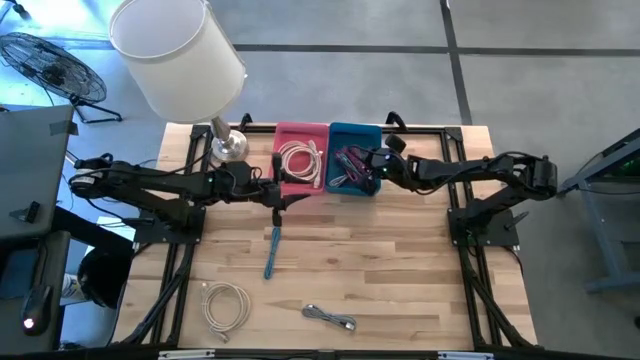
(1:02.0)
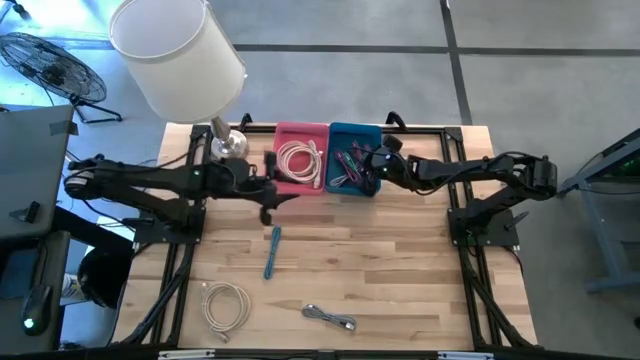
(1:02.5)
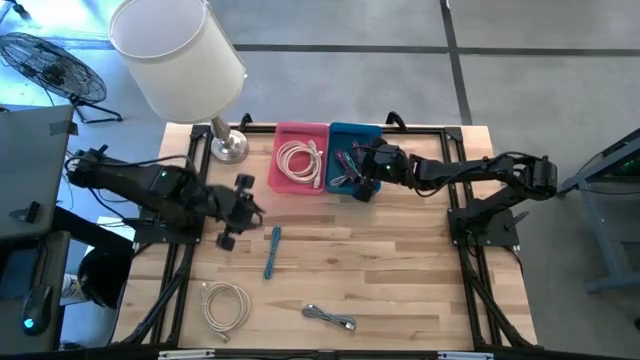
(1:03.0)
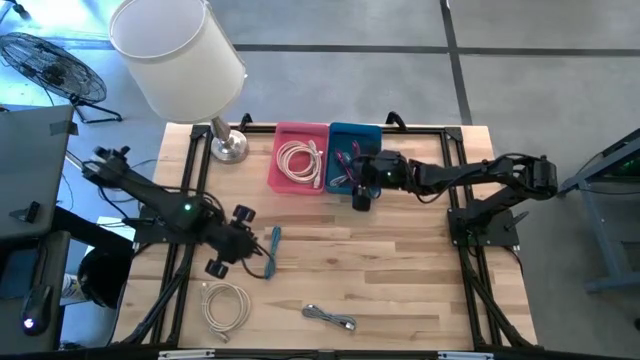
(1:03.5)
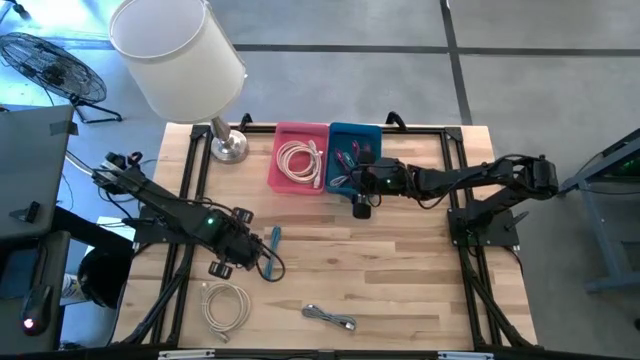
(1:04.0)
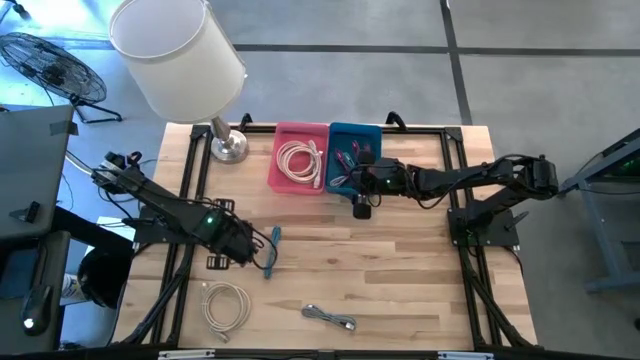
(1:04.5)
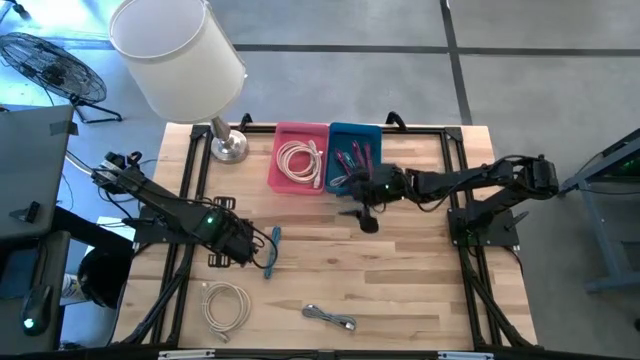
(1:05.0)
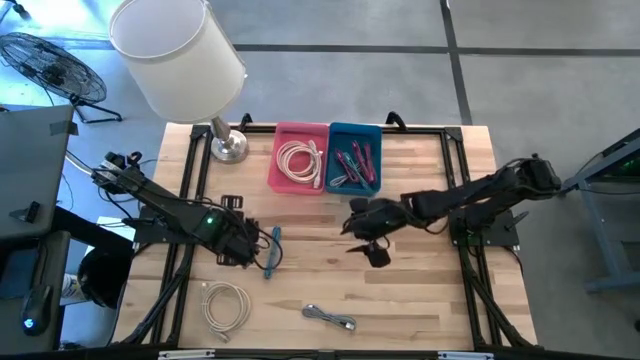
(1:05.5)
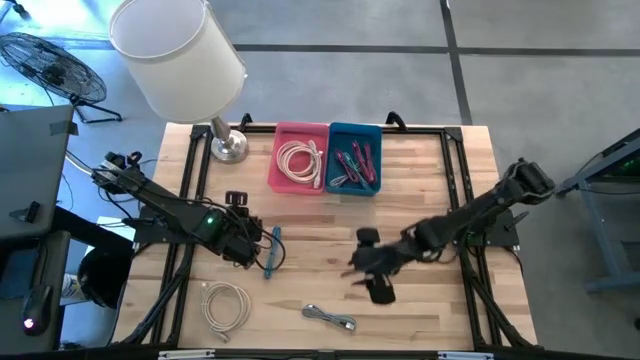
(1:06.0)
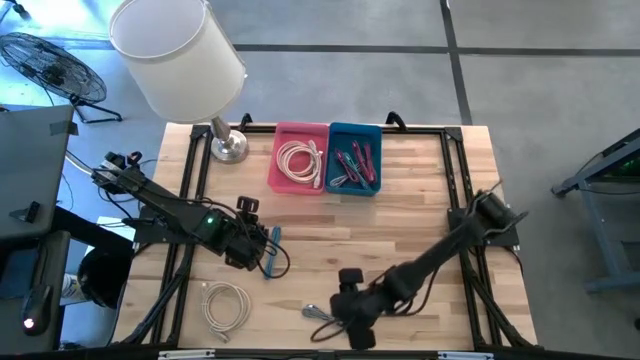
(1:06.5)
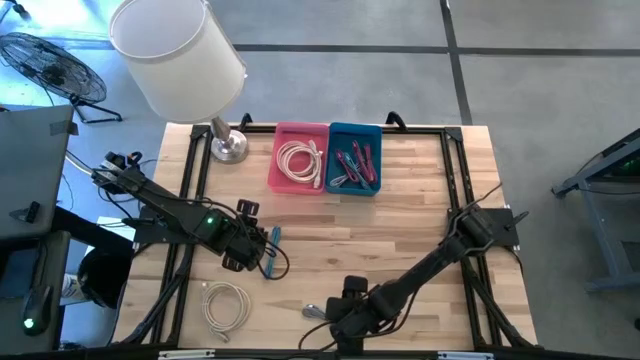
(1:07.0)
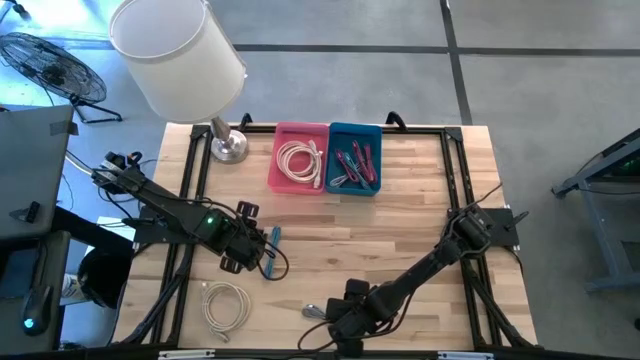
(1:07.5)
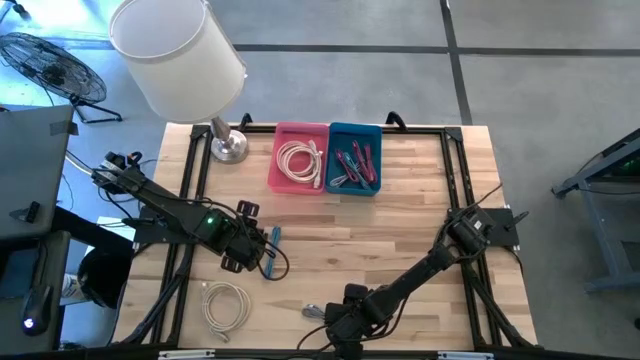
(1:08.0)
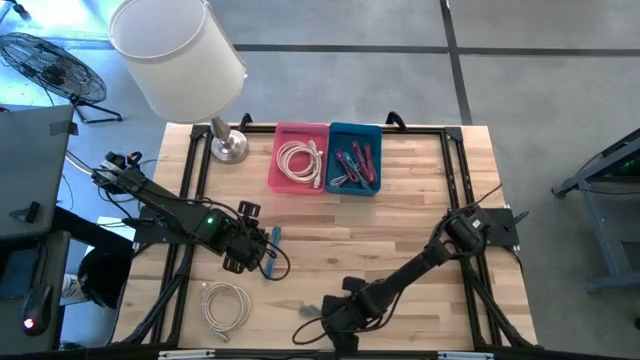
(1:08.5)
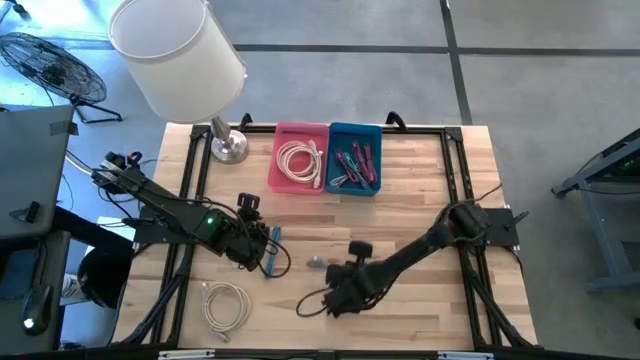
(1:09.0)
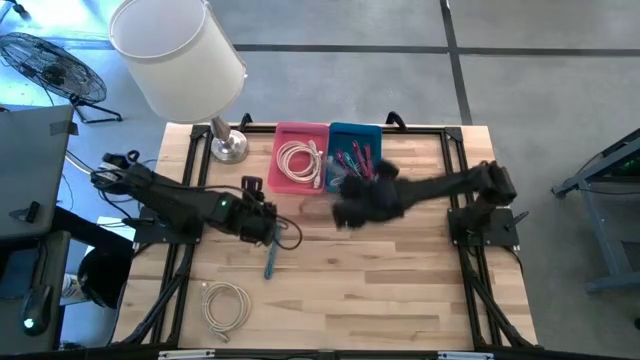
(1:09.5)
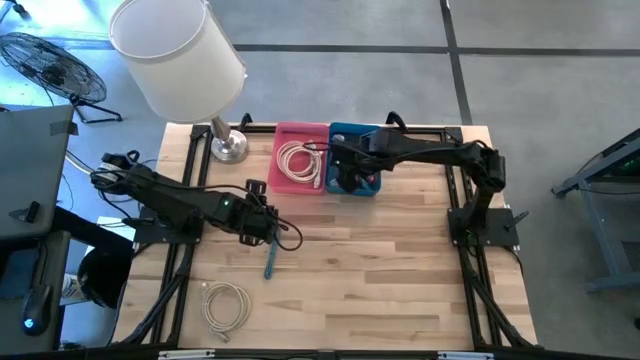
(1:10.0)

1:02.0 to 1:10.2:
Task: Pick & Place USB Port
Put the white and black charger cable into the blue bin

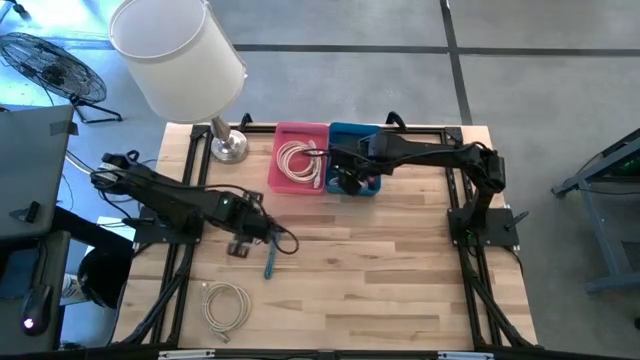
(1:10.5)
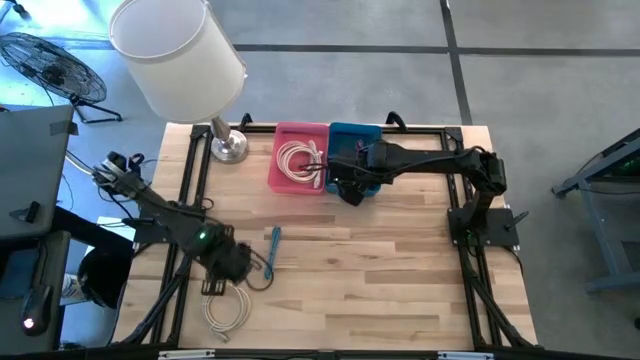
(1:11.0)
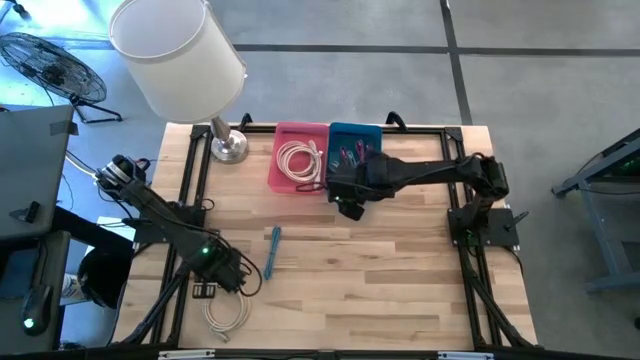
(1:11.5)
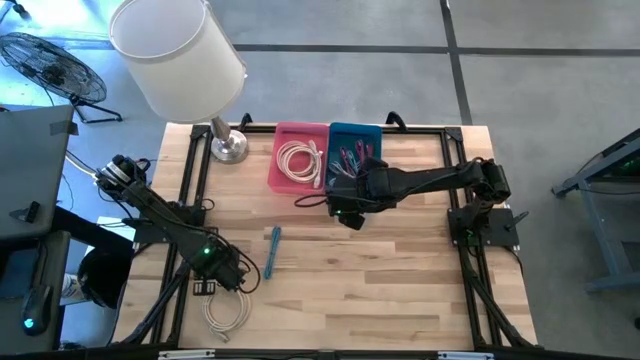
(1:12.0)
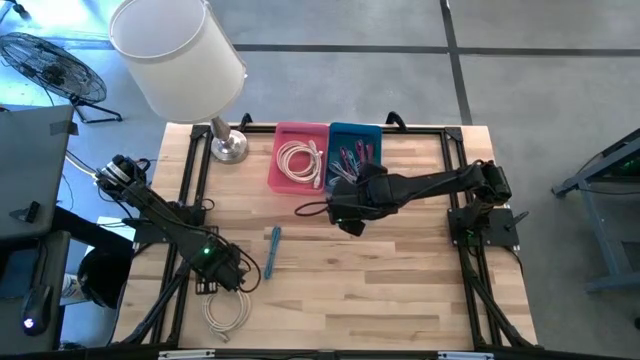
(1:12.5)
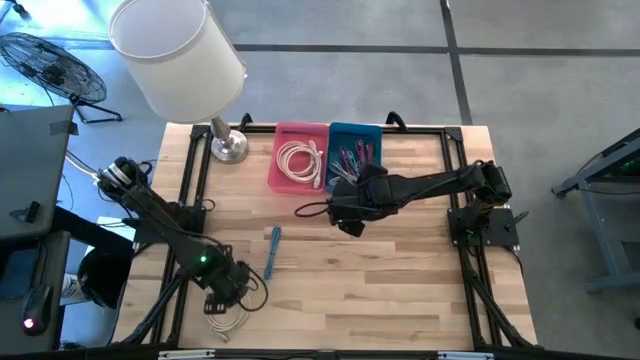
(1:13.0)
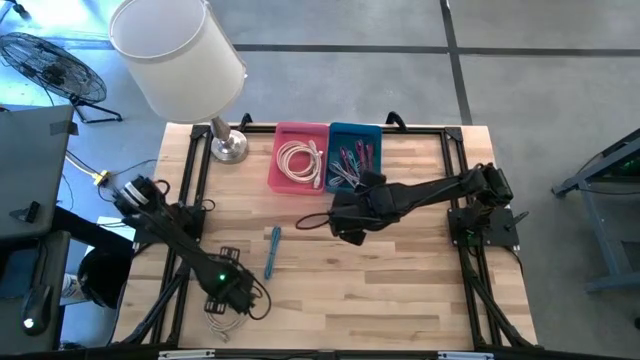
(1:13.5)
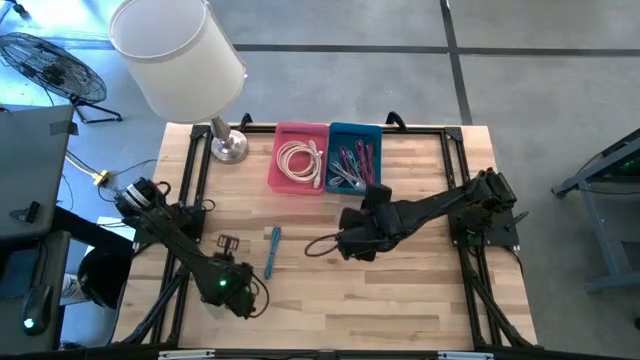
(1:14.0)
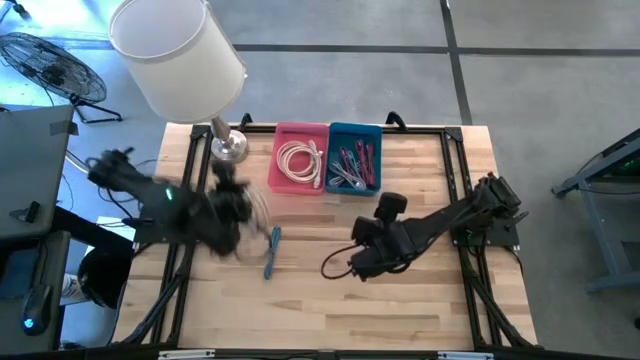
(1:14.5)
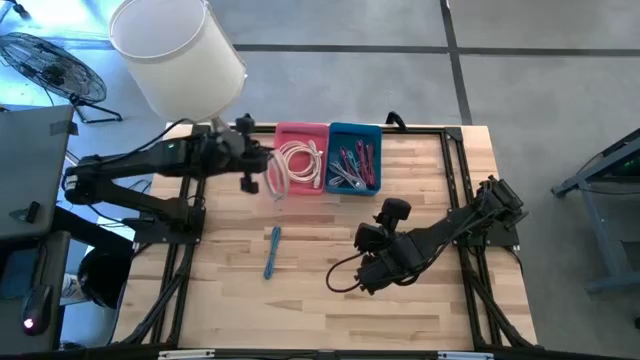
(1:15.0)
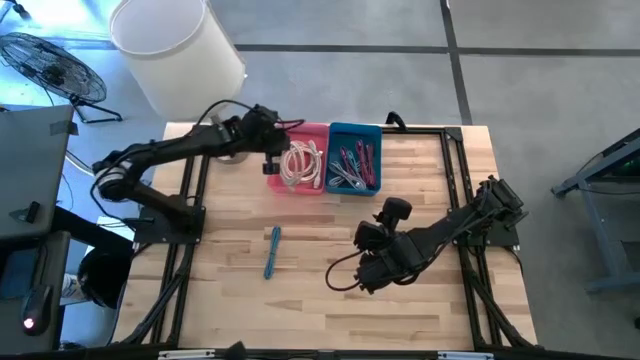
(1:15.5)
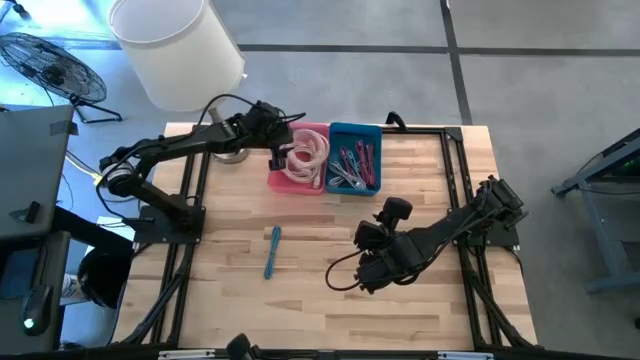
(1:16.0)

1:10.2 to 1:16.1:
Put the light brown hdmi cable into the pink bin

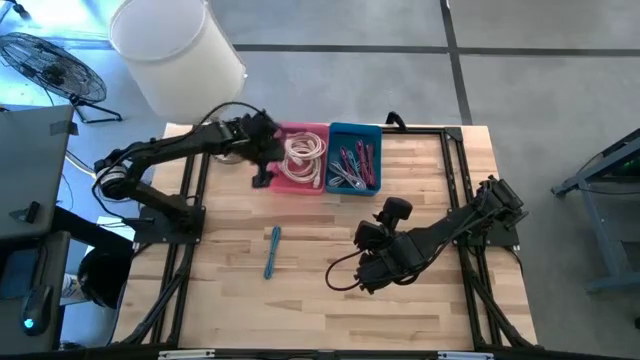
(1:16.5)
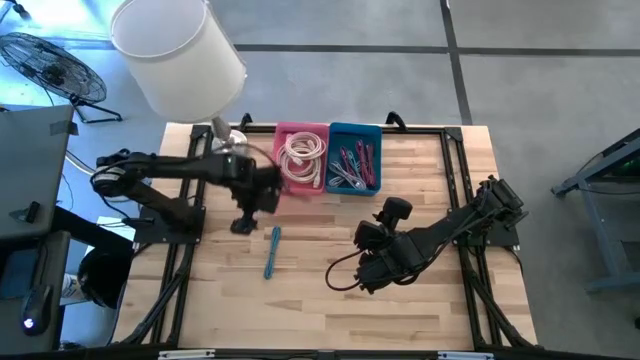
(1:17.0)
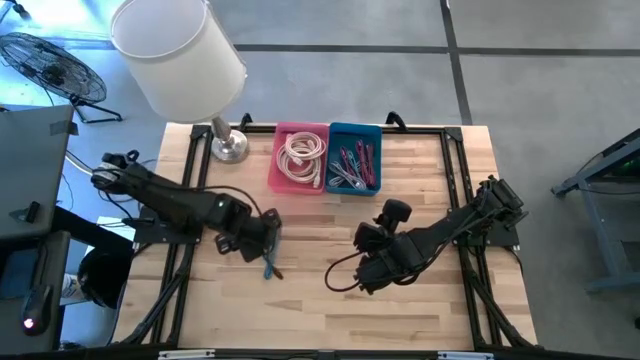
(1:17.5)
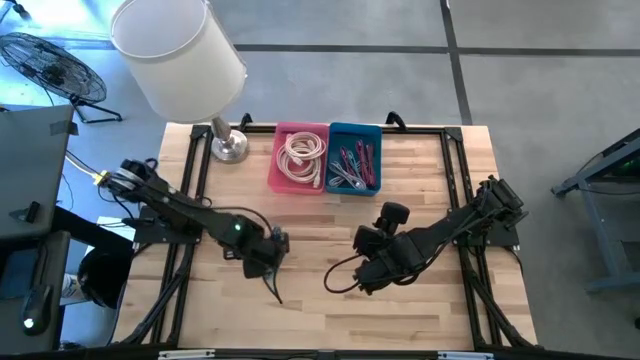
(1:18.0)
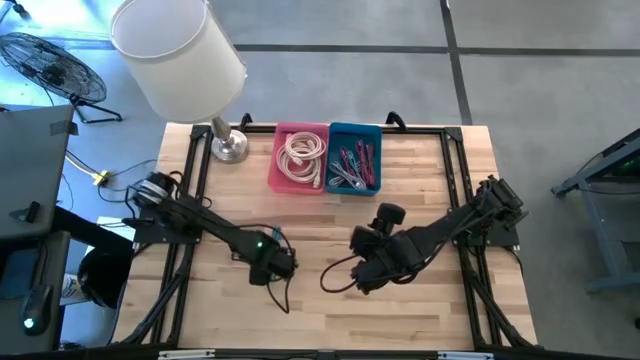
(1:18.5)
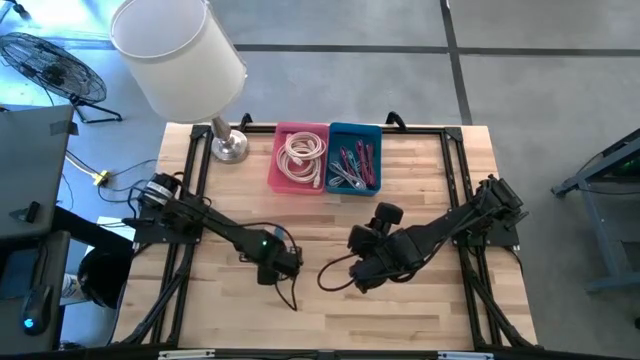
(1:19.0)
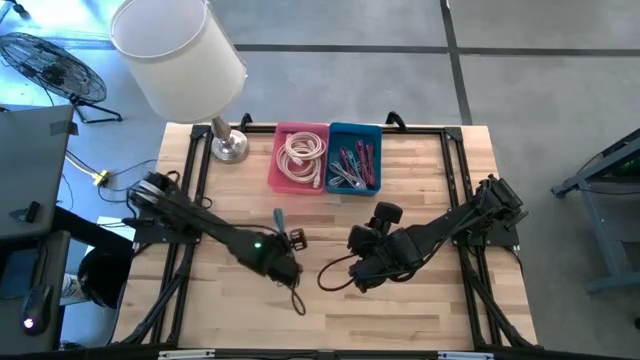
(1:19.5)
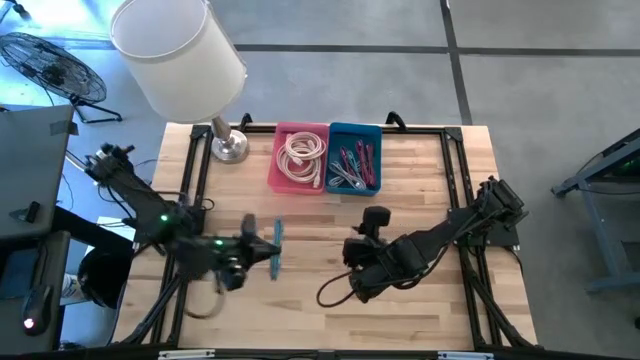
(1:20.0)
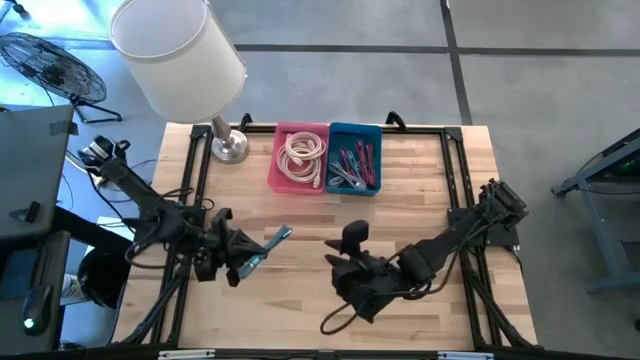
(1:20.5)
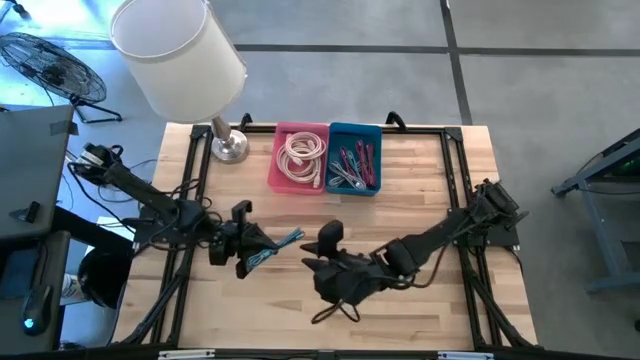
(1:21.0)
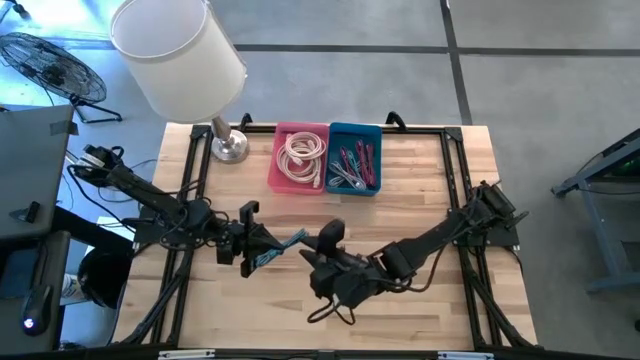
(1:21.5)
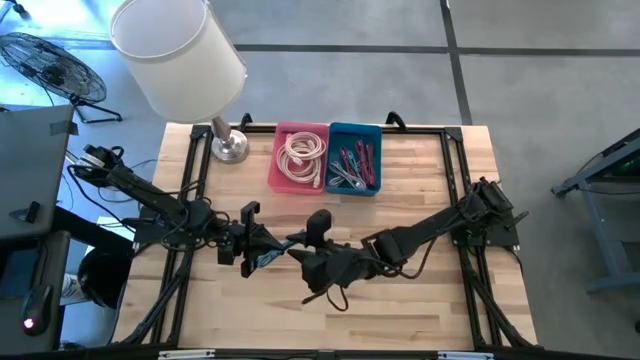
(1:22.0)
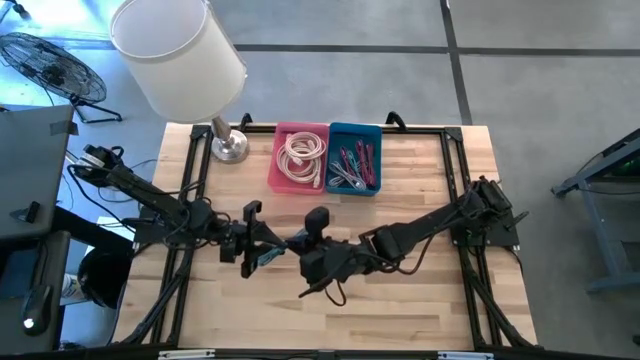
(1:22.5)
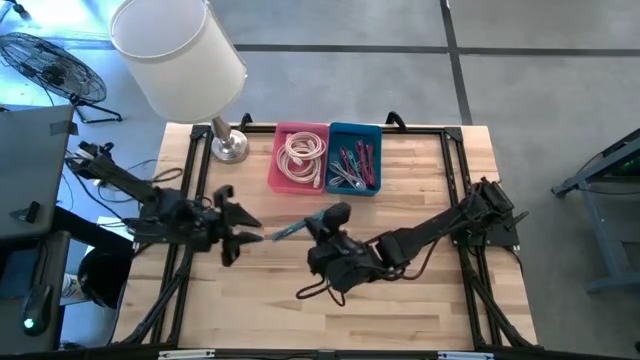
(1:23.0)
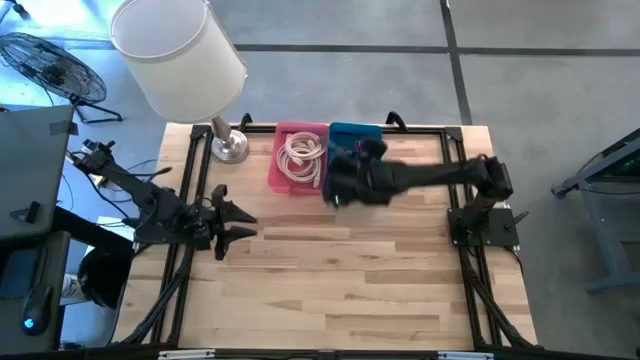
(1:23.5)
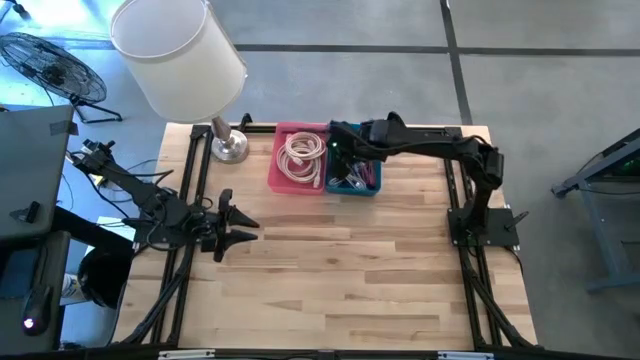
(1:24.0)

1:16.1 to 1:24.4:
Put the blue charger cable into the blue bin
